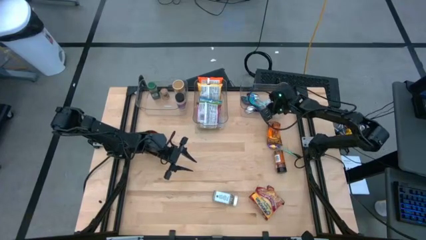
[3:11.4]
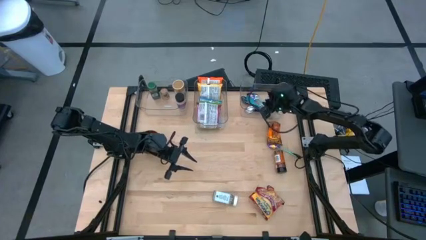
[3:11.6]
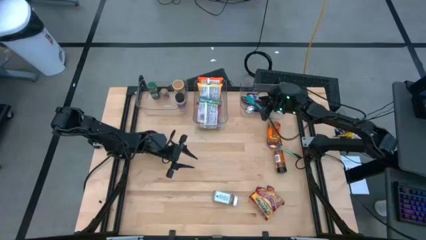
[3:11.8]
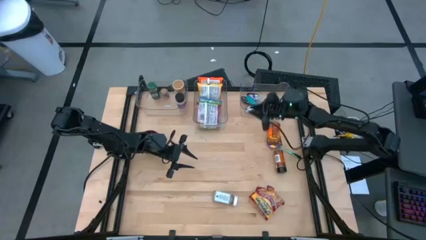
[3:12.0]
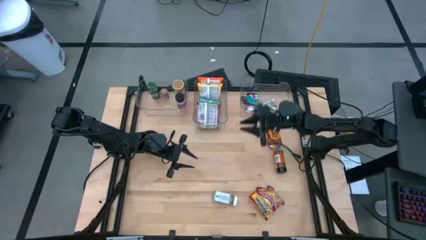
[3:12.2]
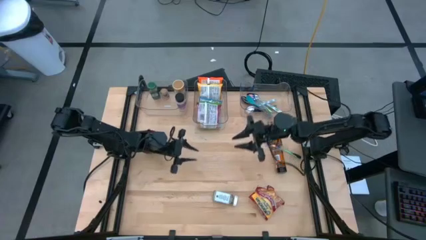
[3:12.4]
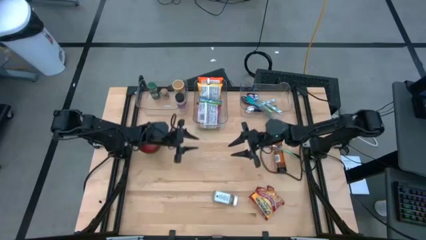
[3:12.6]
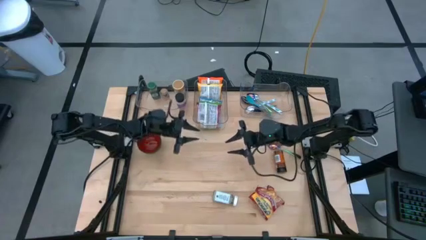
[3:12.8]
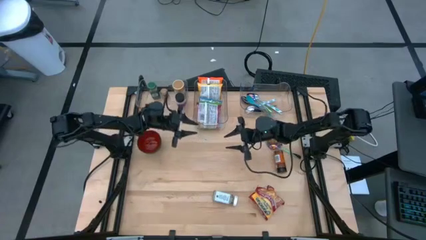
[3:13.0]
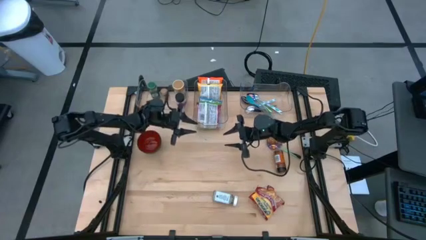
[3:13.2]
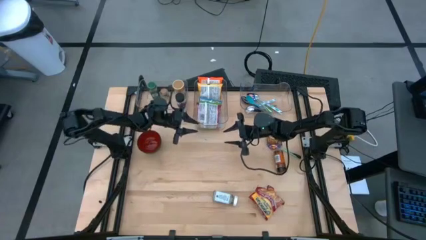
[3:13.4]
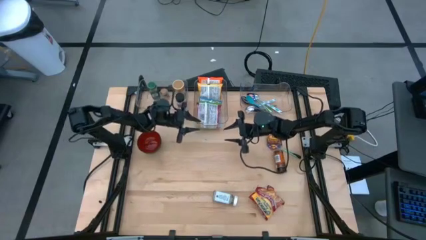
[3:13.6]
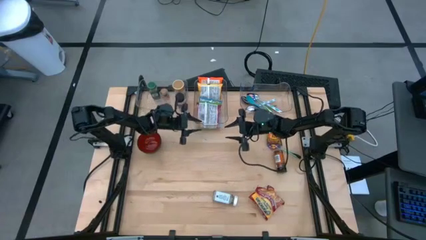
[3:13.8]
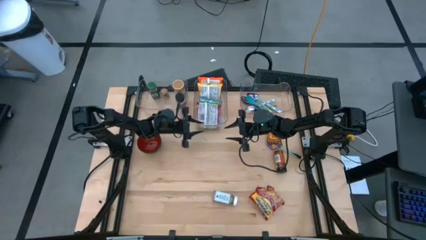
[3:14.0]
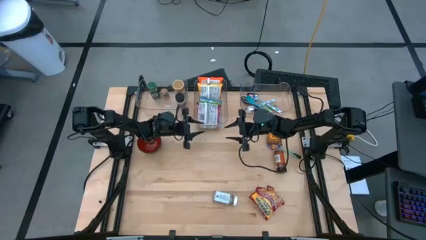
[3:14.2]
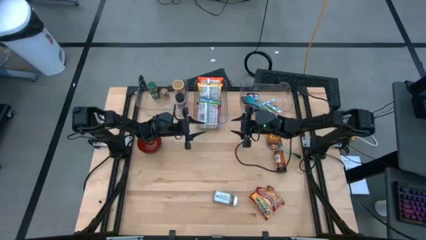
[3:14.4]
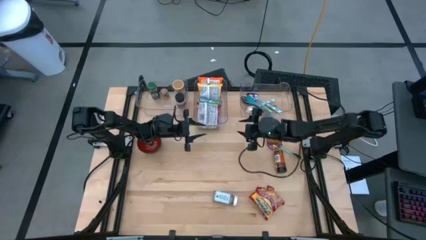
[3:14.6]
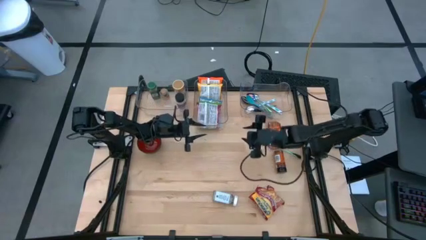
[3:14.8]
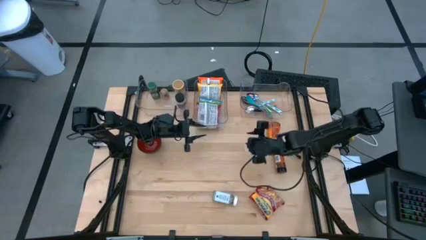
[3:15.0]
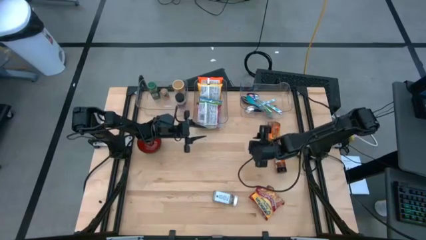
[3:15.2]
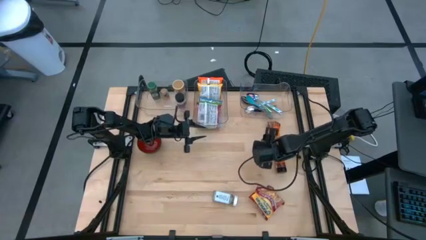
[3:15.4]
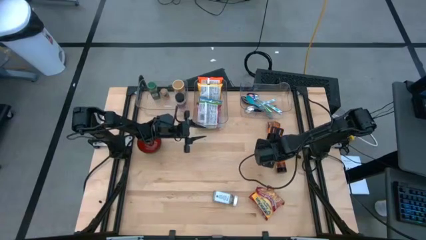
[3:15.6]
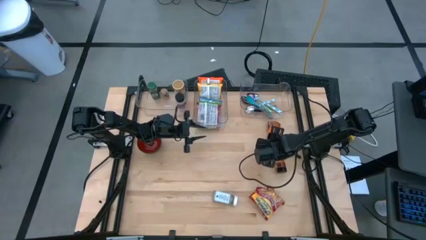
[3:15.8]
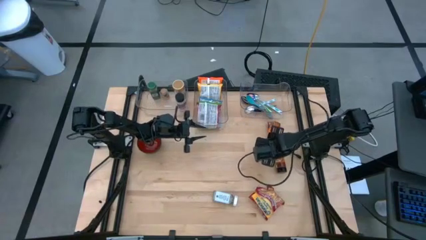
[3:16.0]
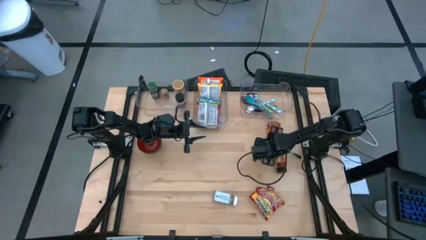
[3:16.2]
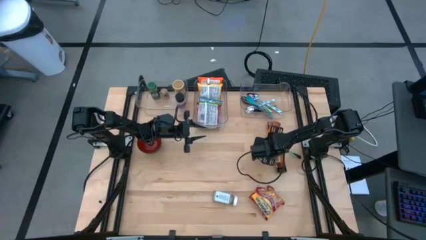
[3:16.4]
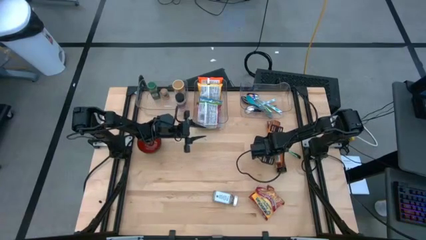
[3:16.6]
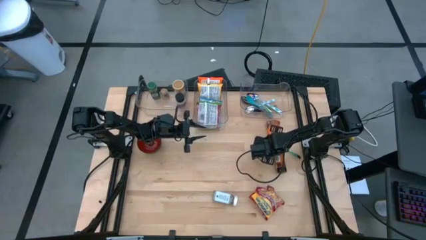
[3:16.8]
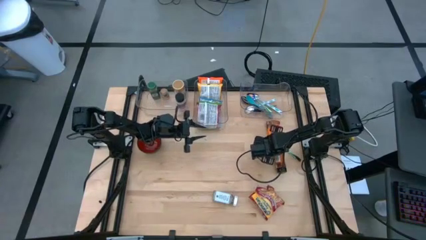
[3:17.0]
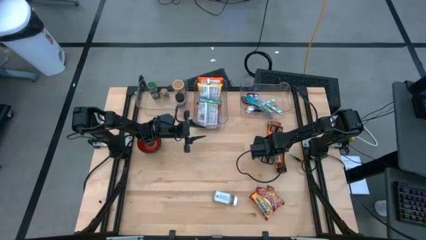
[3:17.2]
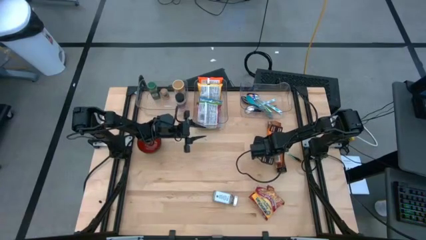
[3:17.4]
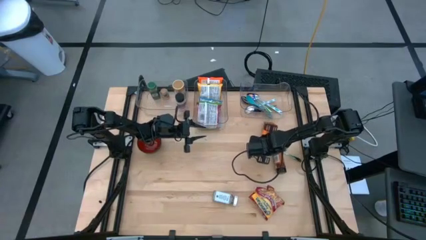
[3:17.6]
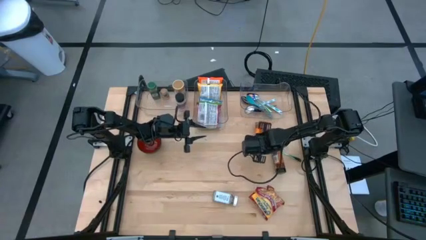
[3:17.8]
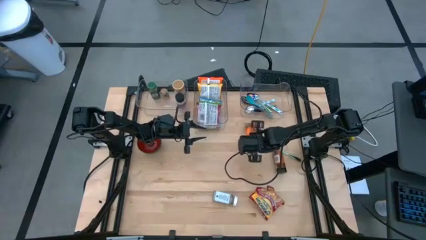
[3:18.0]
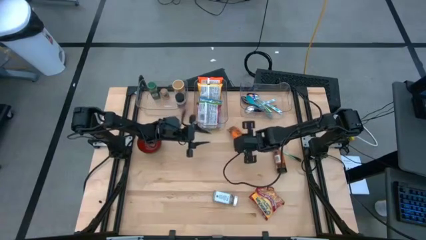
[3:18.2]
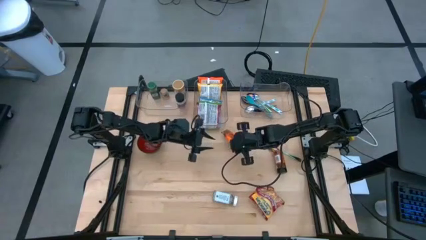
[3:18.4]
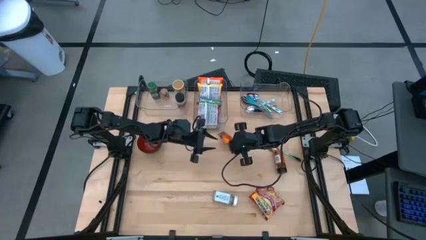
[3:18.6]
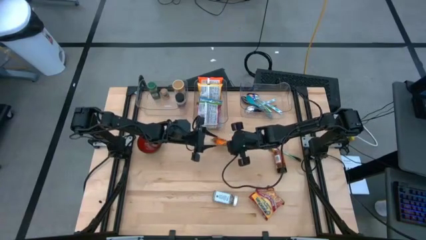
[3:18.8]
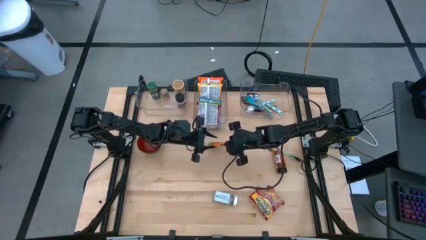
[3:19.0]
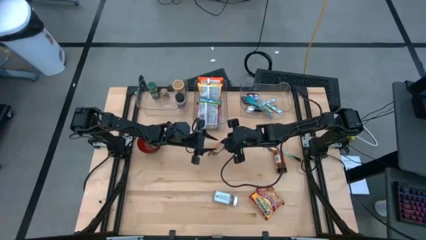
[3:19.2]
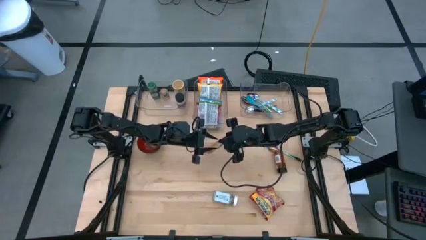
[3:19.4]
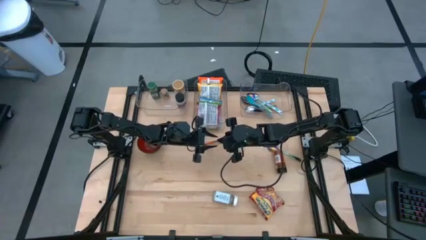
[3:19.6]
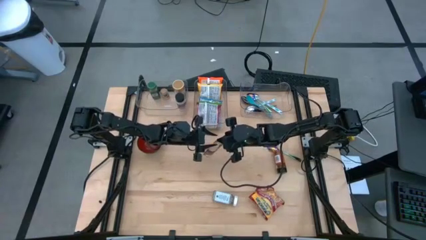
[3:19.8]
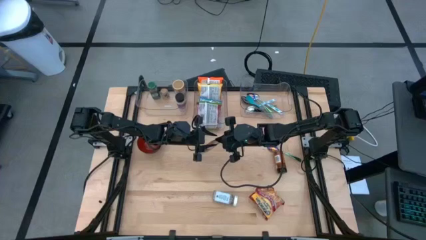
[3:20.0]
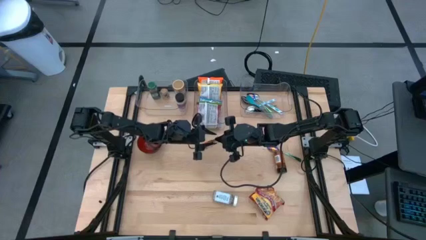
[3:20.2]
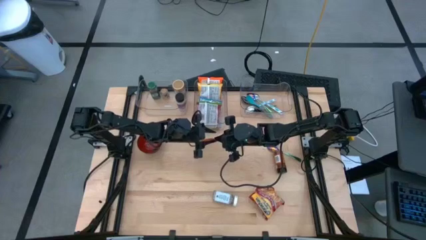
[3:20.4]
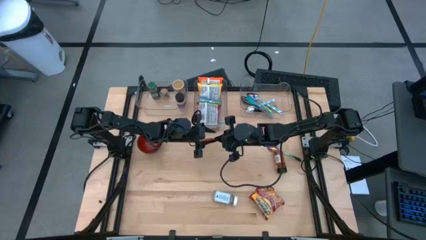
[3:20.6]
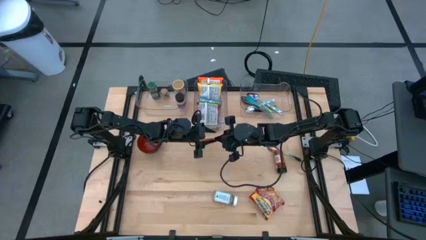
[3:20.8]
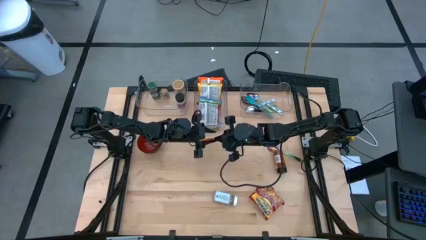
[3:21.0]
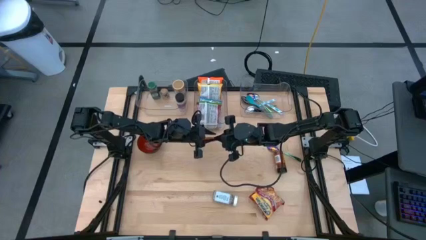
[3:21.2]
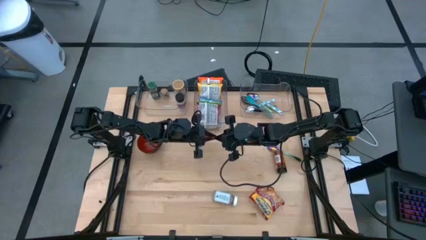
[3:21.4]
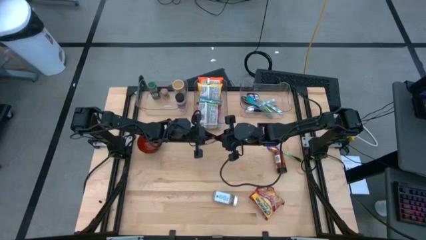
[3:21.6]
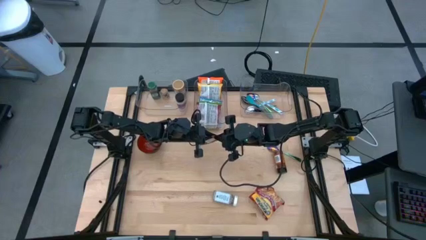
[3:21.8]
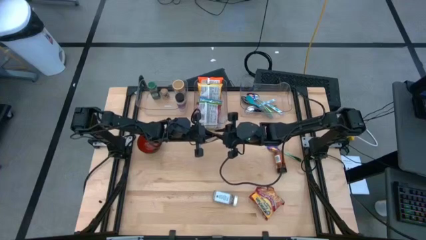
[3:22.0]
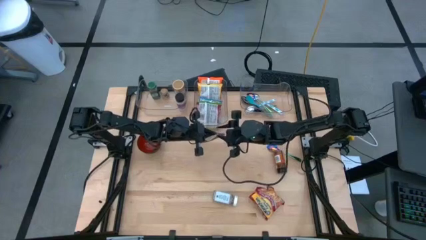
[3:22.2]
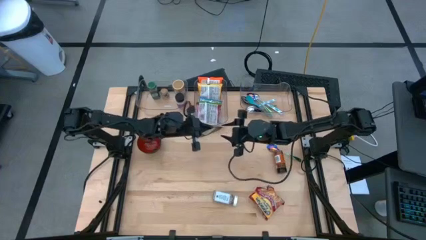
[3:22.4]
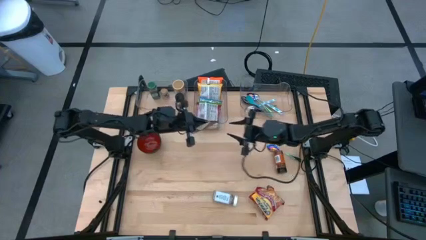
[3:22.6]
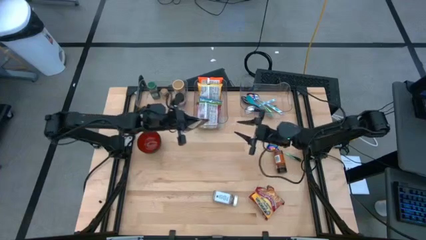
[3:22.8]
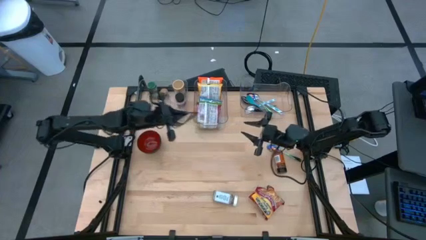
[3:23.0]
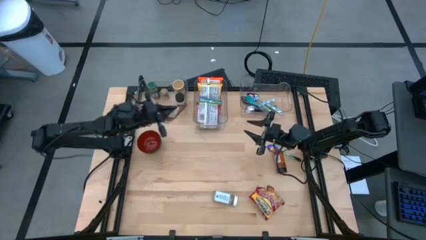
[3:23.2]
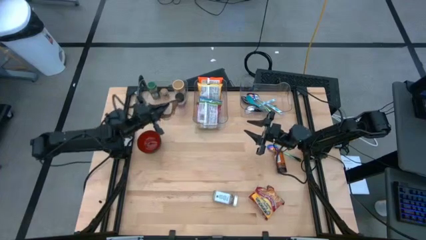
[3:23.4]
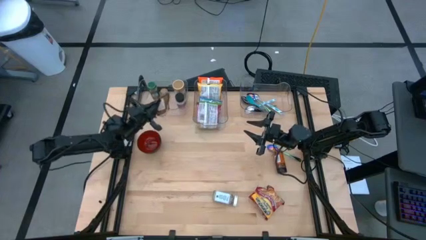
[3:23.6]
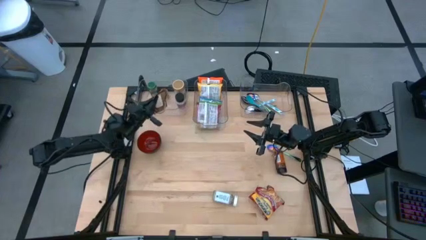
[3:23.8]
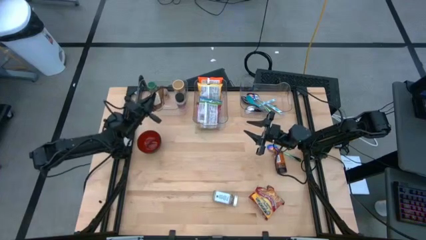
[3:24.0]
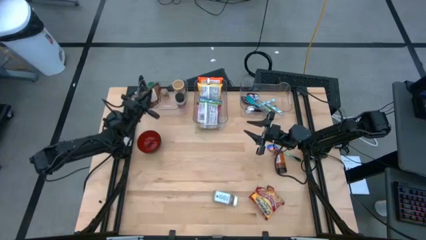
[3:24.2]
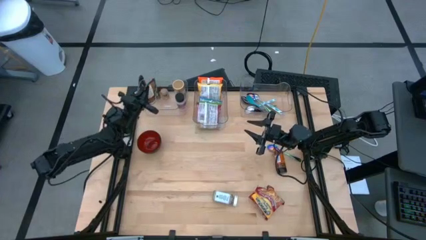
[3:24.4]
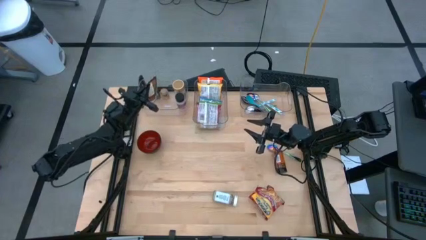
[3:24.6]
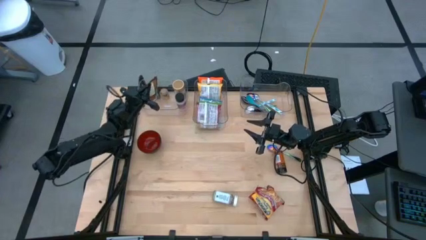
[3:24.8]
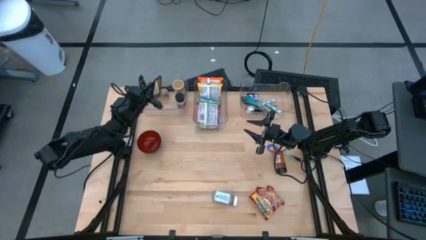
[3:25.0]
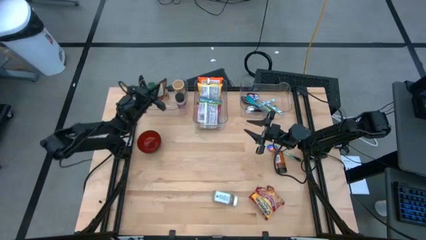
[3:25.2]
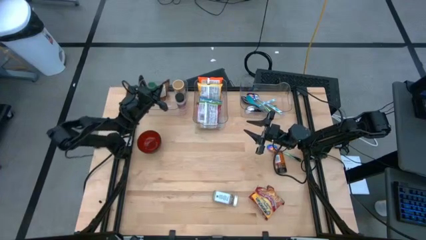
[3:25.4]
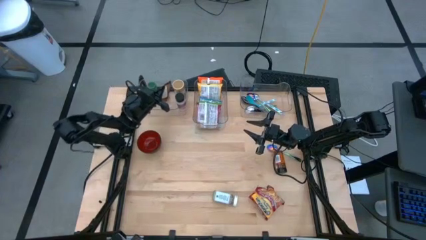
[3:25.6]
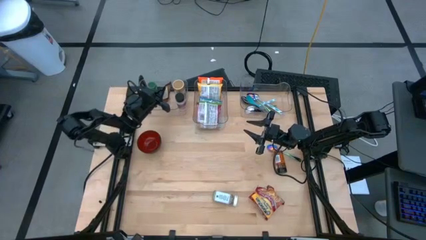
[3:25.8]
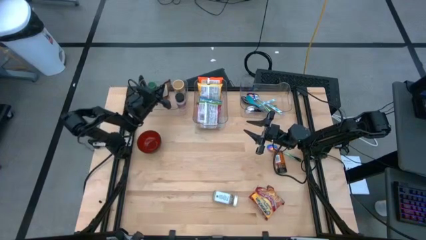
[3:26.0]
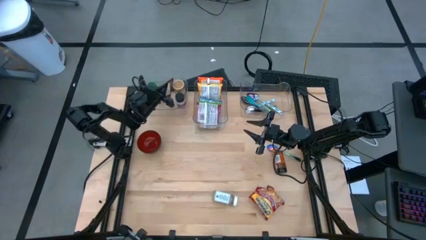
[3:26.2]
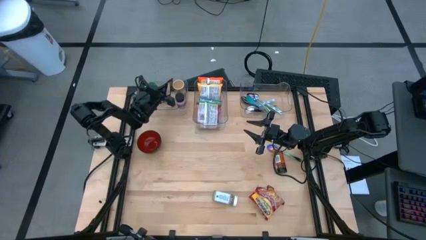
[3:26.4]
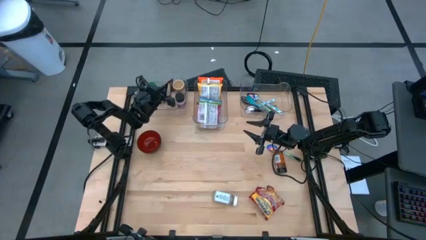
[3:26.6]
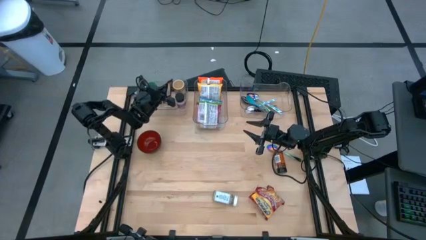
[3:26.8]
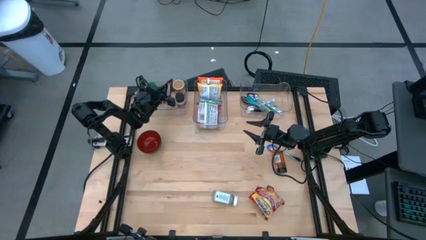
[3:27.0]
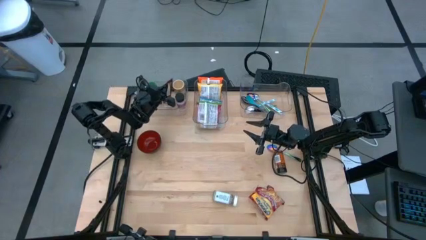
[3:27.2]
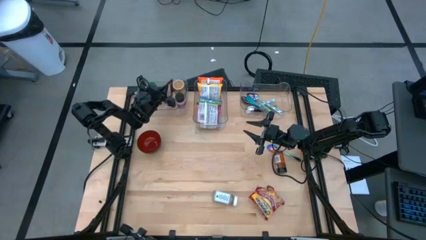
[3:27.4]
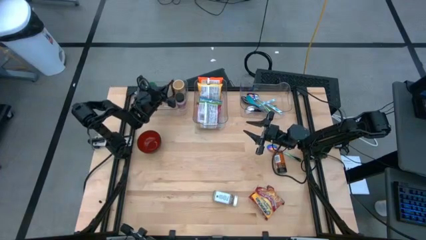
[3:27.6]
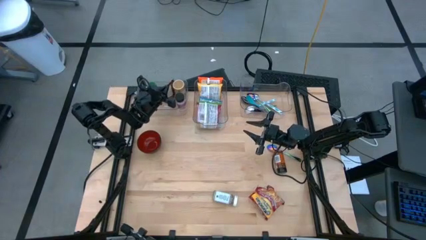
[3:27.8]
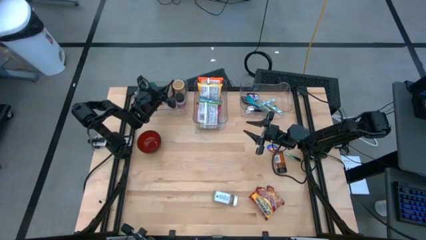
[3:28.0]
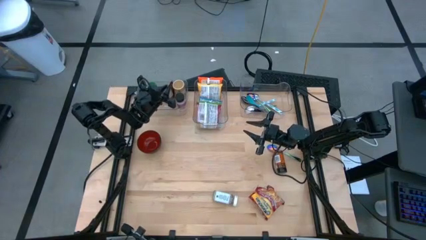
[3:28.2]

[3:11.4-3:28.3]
Task: Pick & Place Food Item
Put the orange seasoning pack into the left transparent bin
